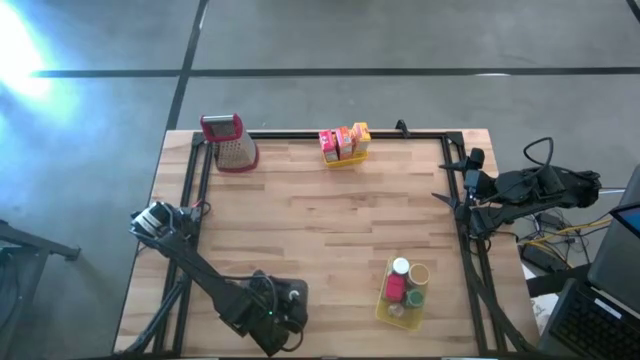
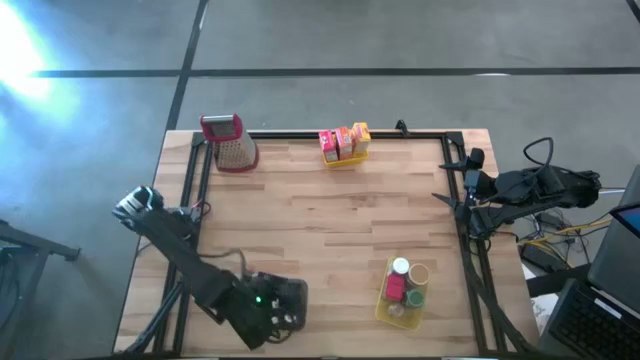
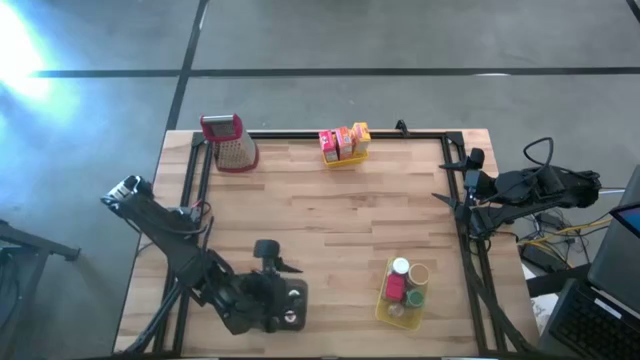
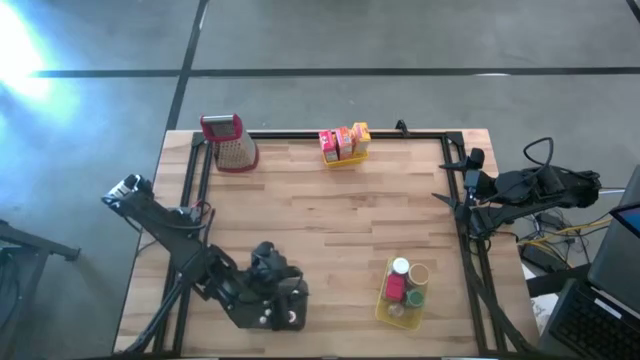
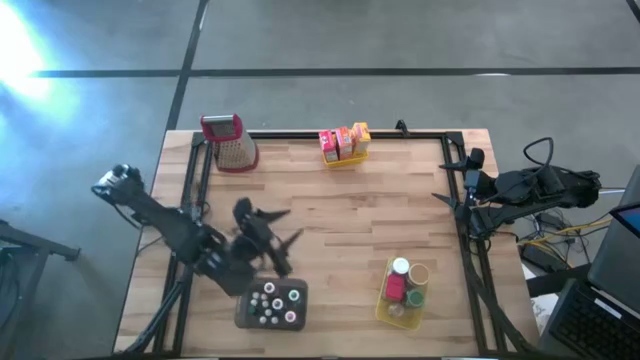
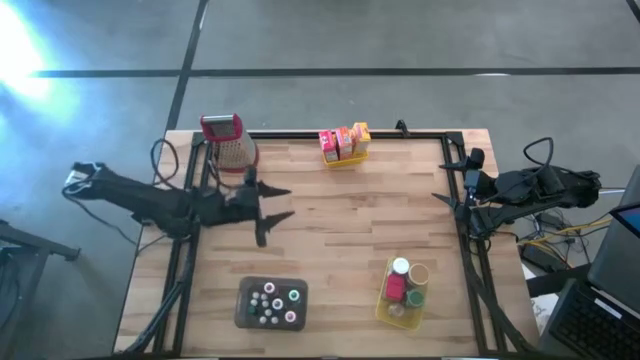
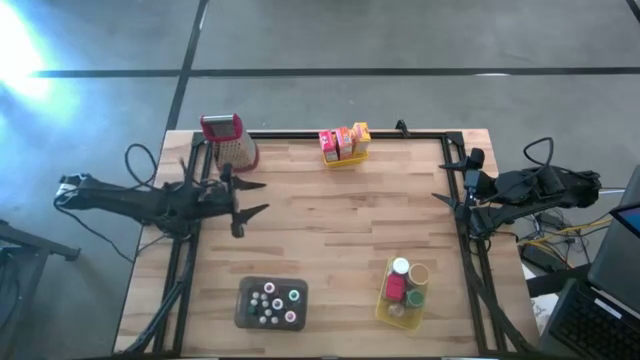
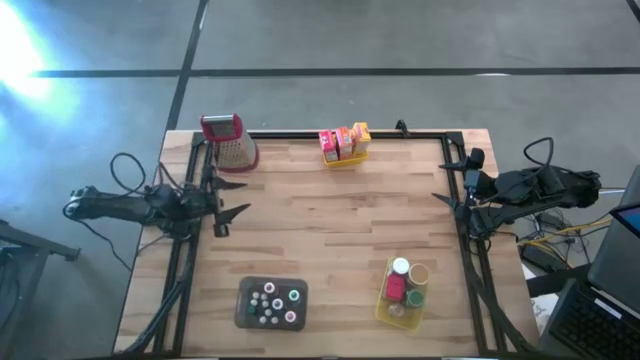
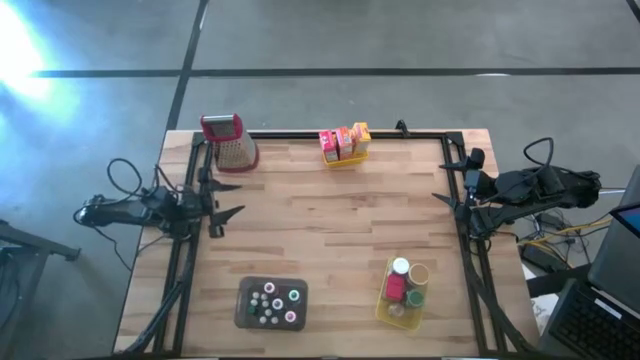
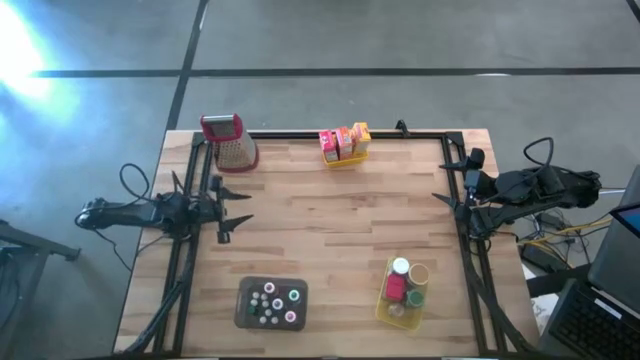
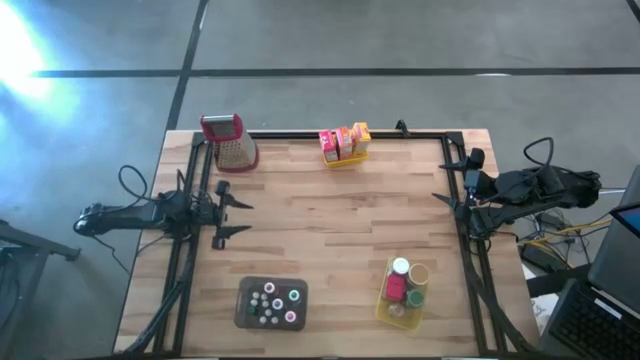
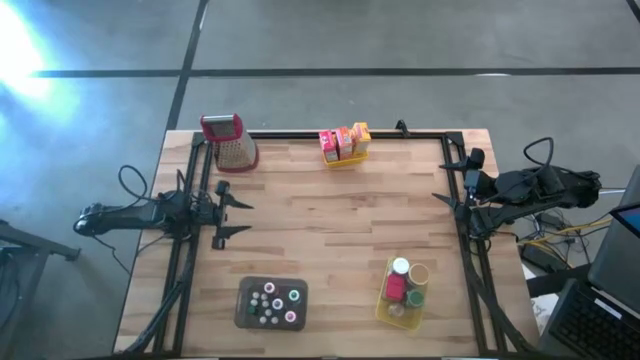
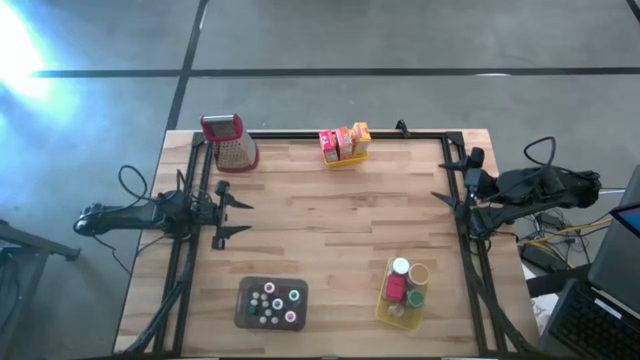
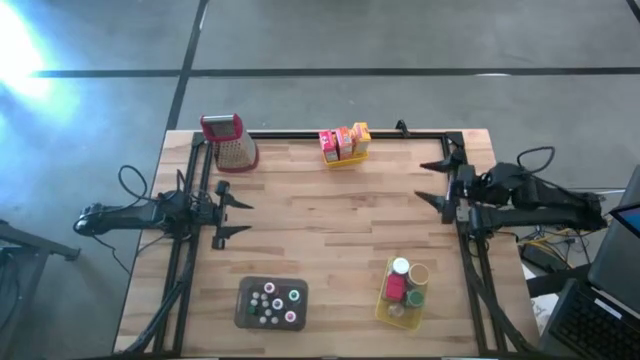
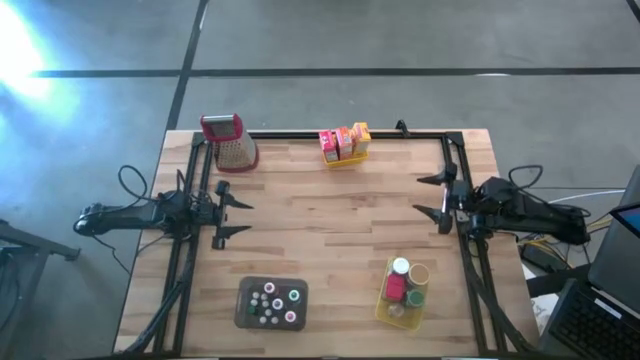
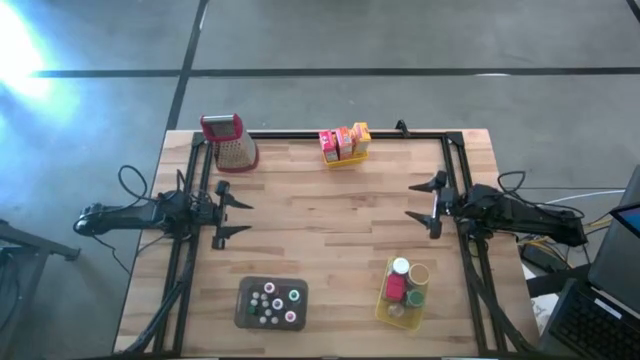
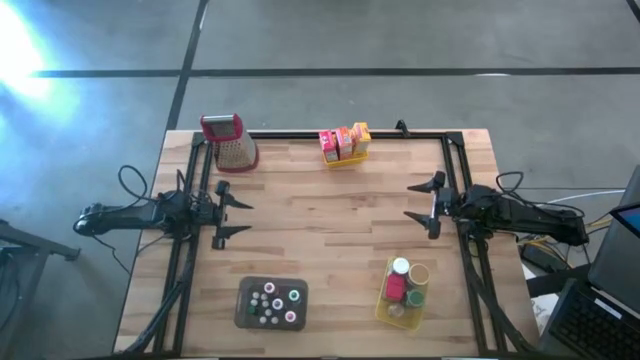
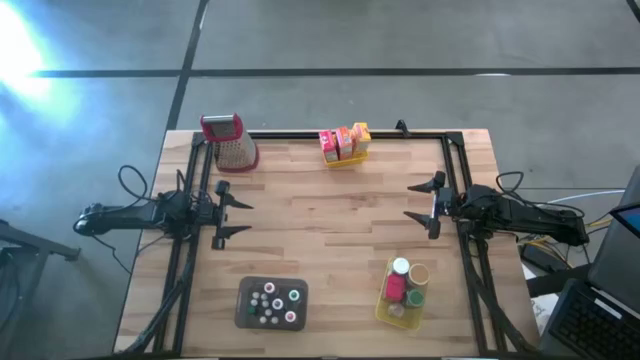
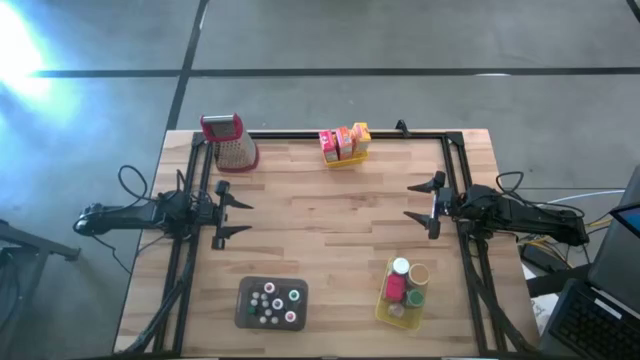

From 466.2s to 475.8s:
Task: Pick & Place Kitchen Items
Return to Home Position

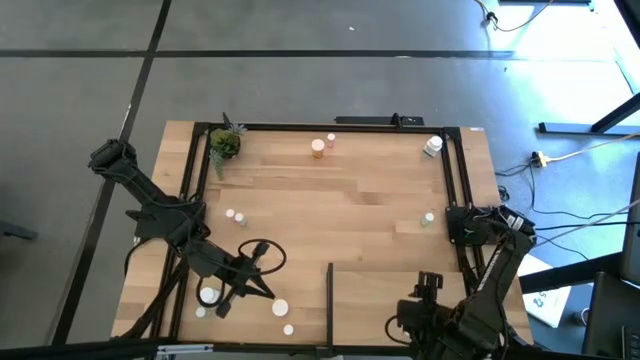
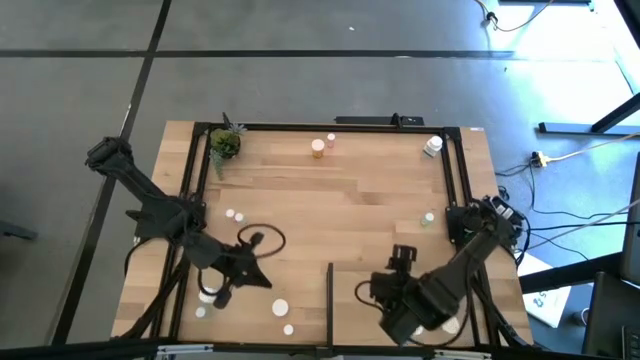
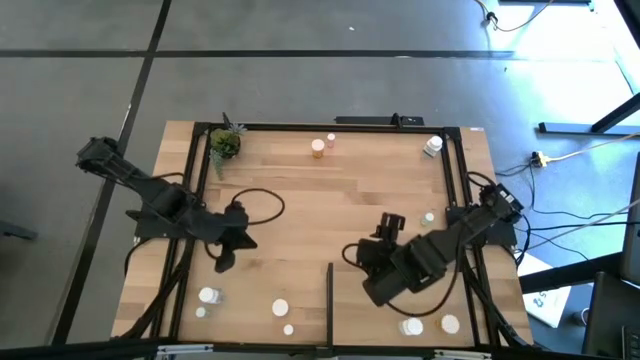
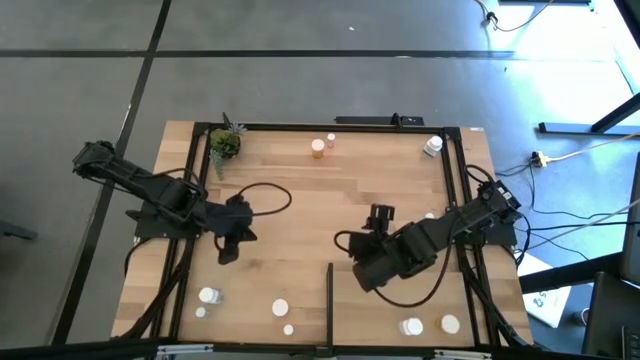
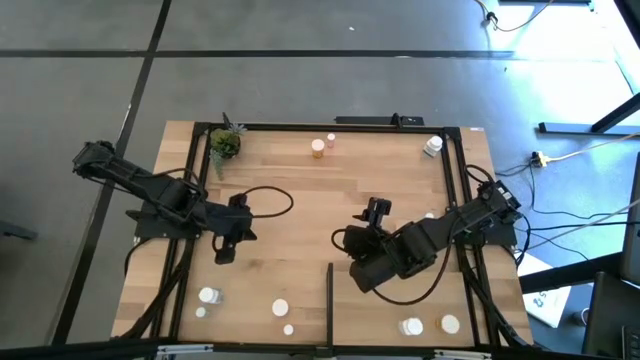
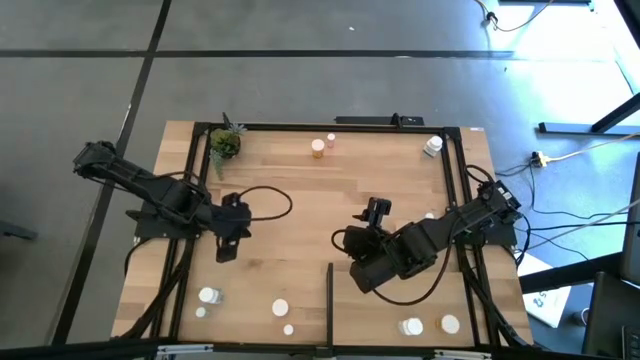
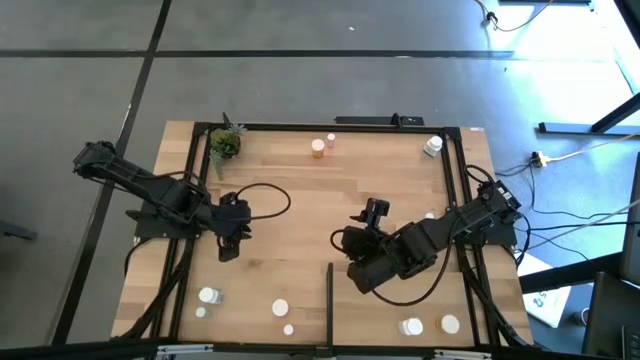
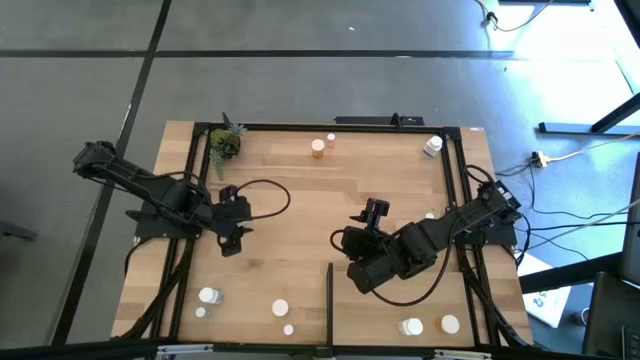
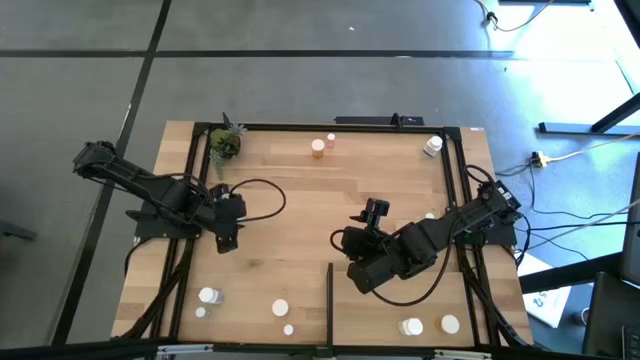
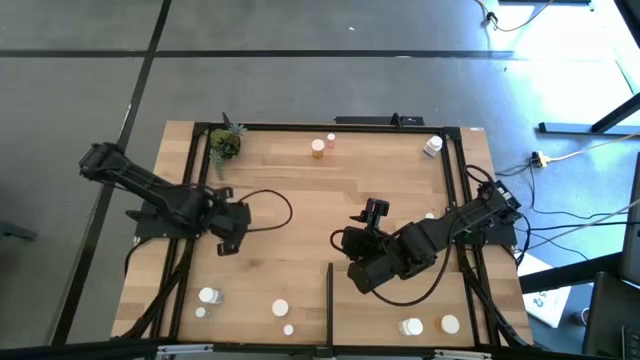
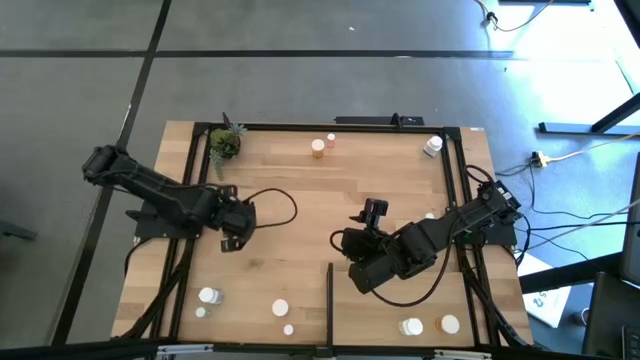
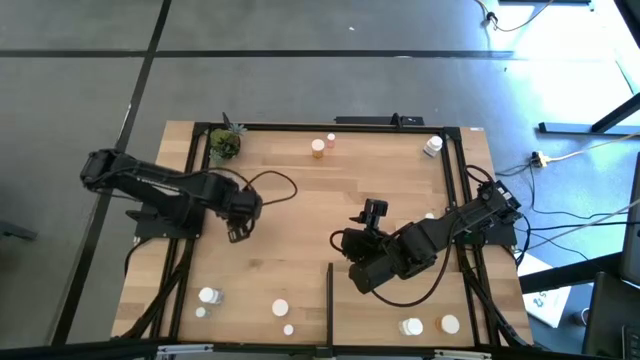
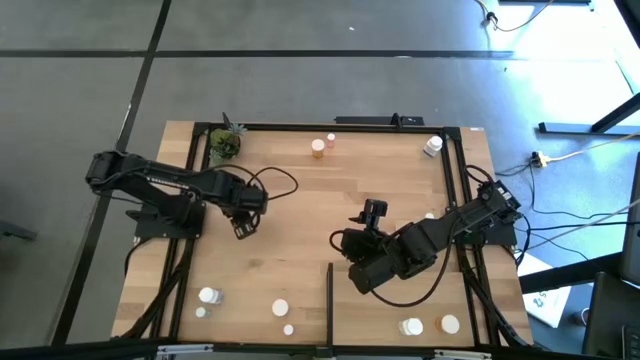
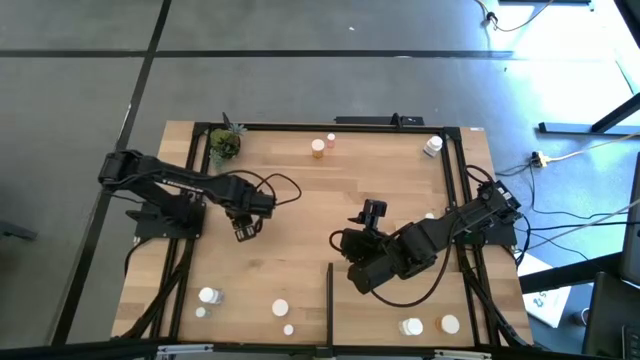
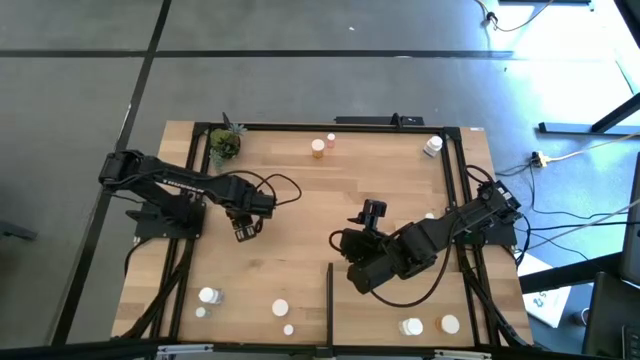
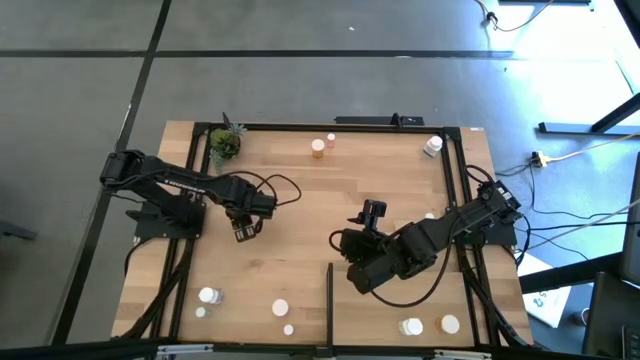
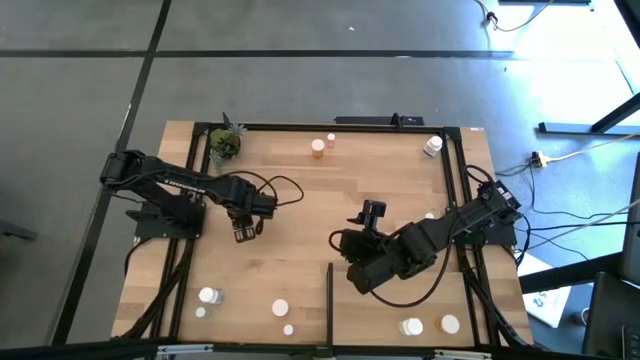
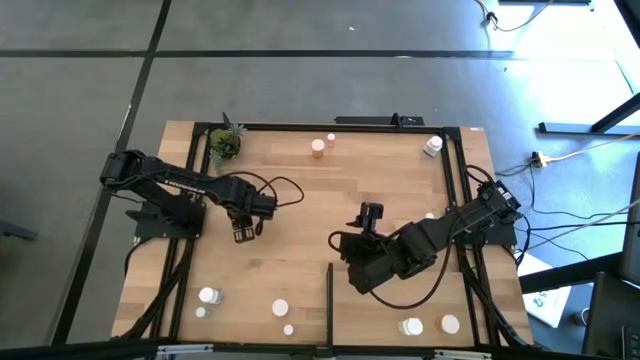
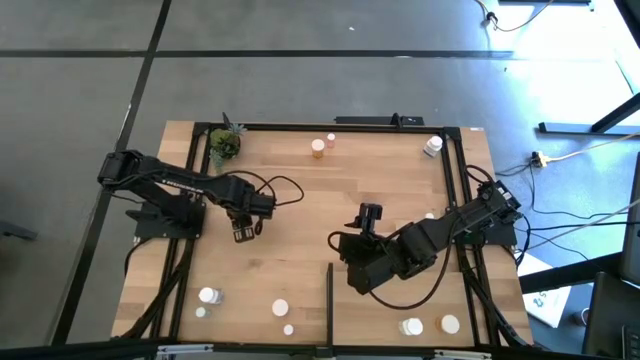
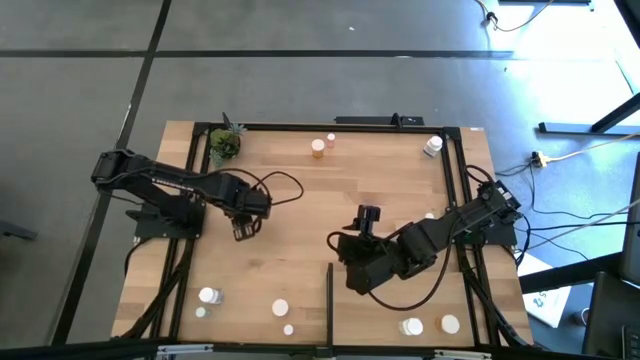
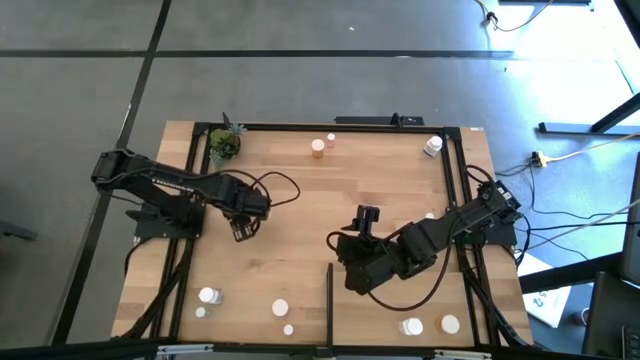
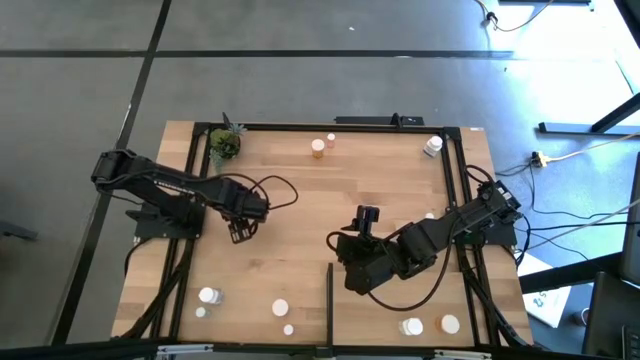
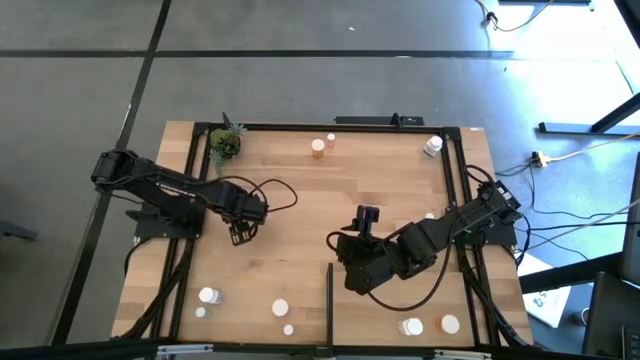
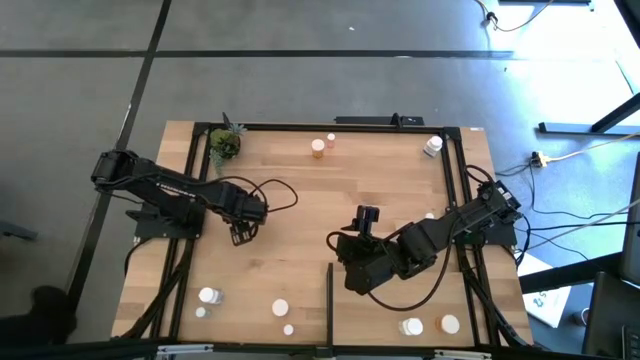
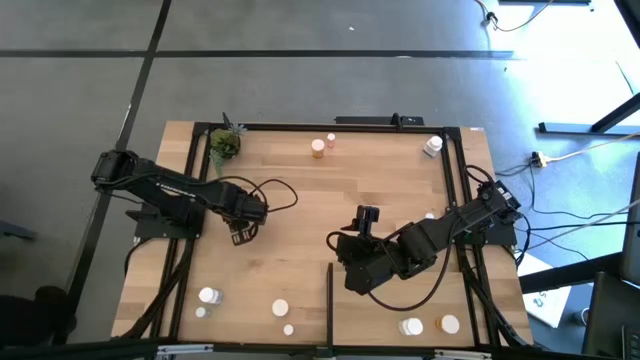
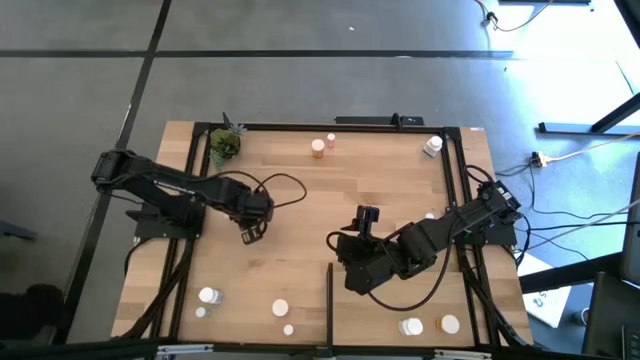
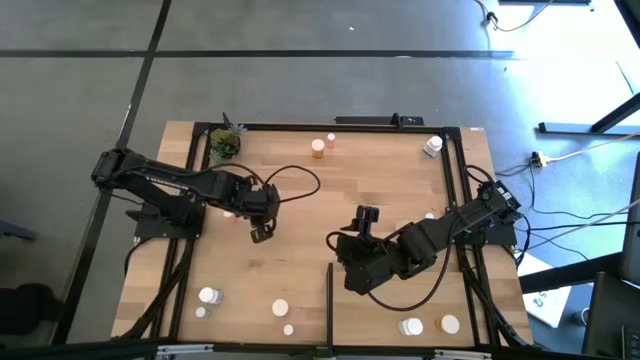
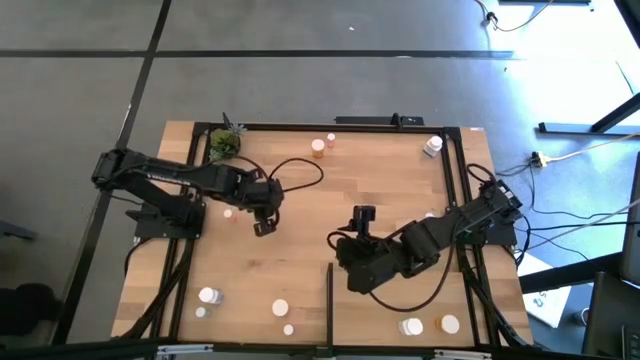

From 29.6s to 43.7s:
Task: Pick and place medicine bottles onto shelf by color
Put the top left blue pill bottle on the shelf
